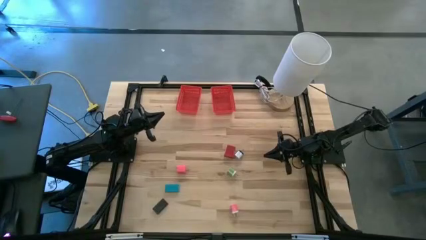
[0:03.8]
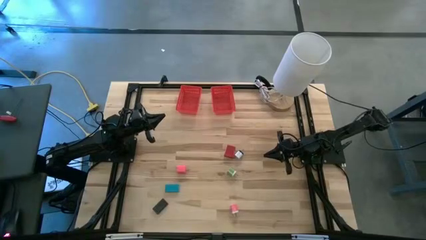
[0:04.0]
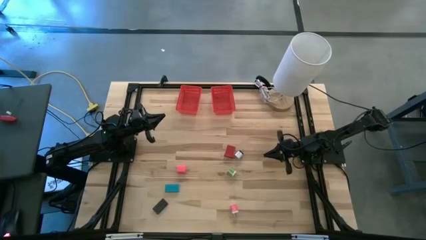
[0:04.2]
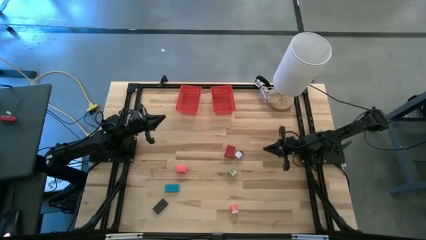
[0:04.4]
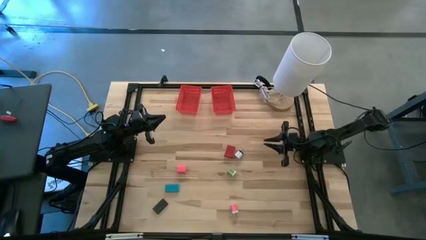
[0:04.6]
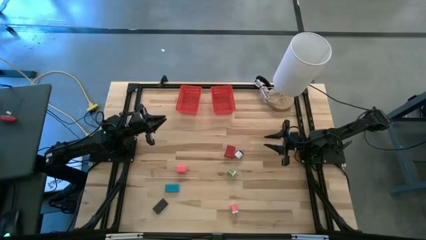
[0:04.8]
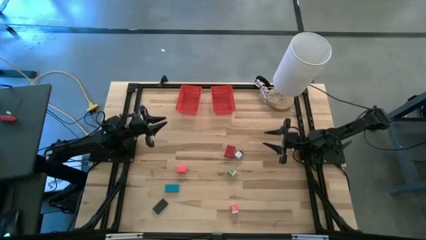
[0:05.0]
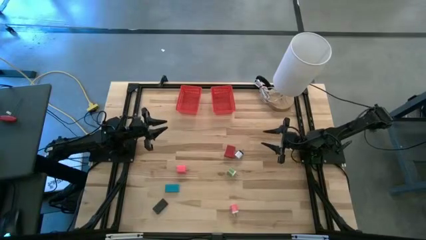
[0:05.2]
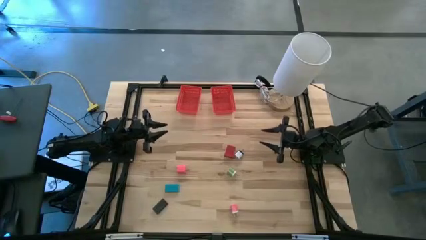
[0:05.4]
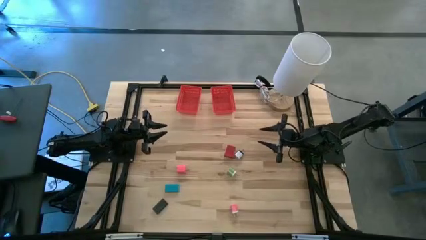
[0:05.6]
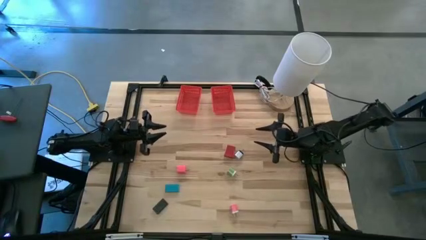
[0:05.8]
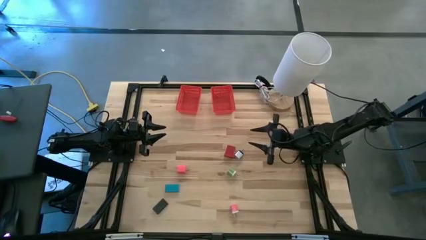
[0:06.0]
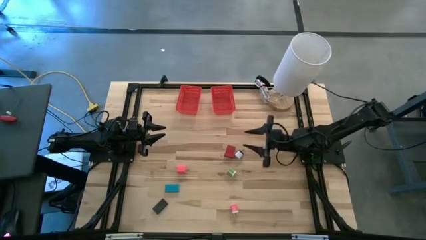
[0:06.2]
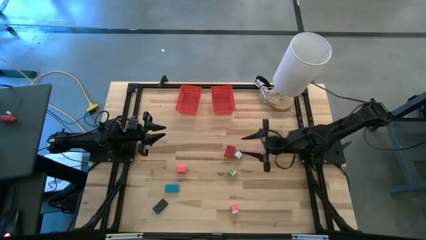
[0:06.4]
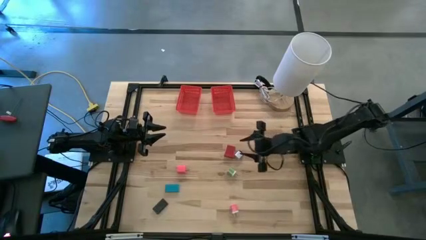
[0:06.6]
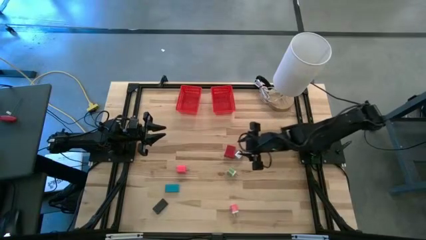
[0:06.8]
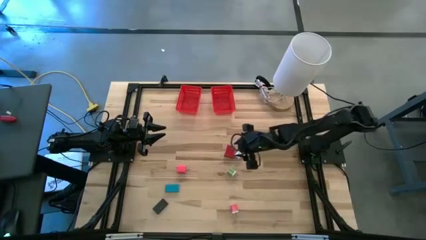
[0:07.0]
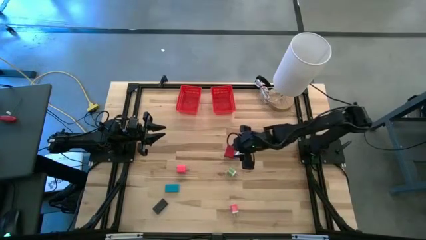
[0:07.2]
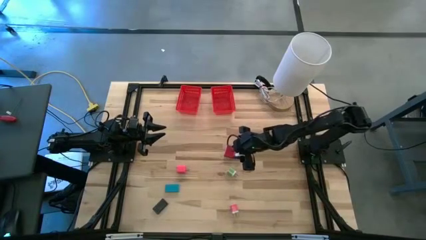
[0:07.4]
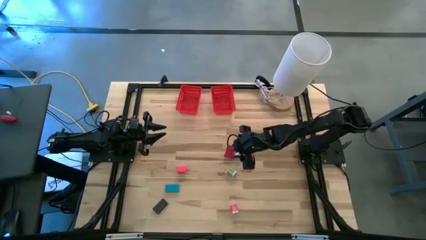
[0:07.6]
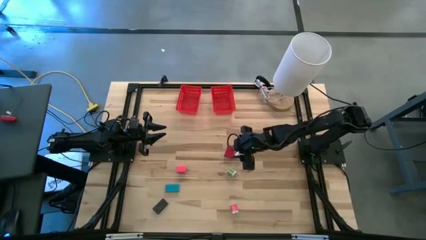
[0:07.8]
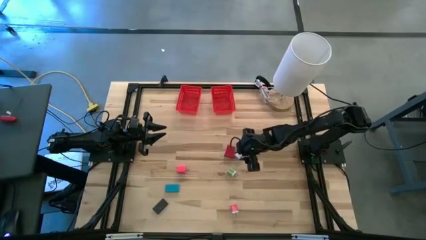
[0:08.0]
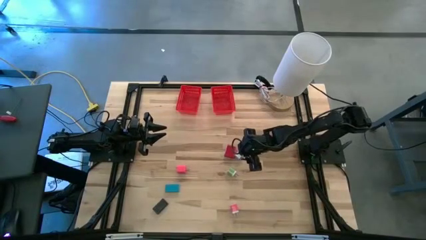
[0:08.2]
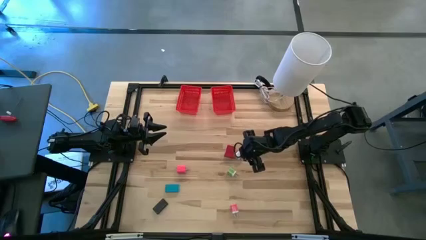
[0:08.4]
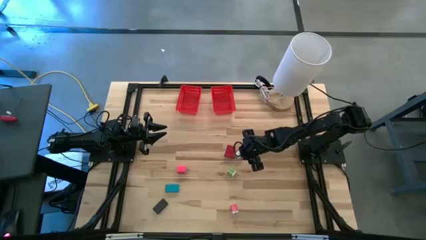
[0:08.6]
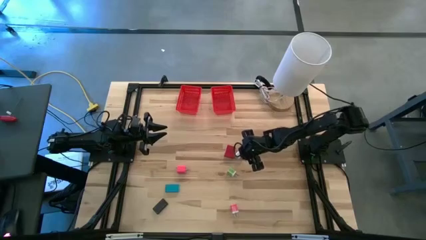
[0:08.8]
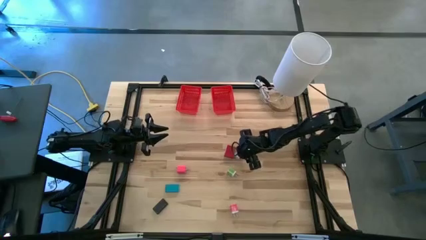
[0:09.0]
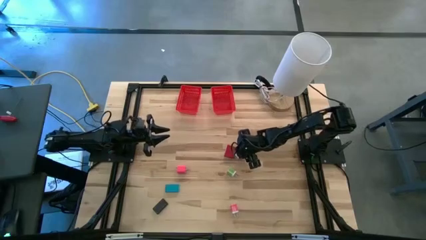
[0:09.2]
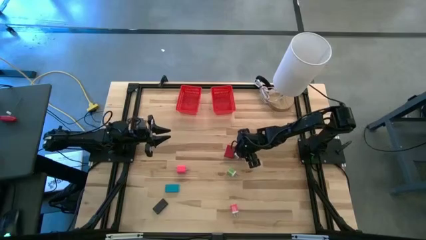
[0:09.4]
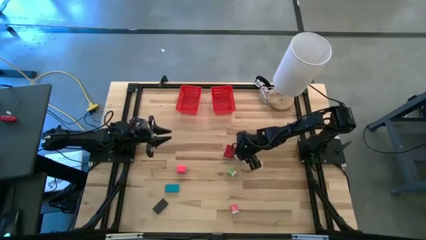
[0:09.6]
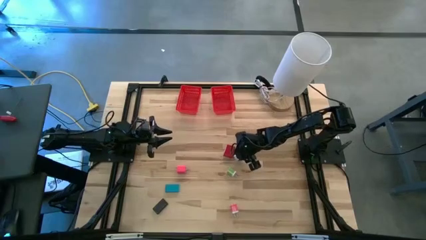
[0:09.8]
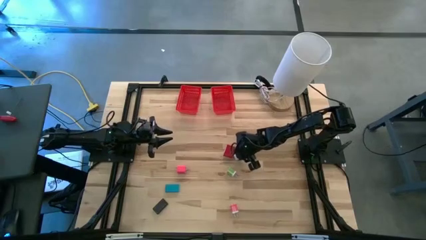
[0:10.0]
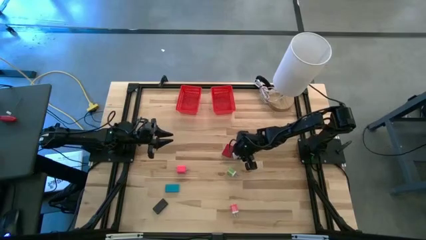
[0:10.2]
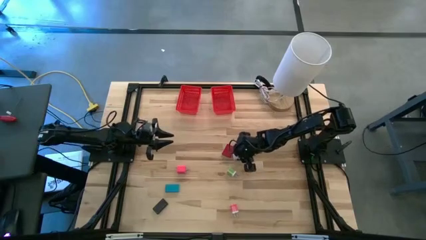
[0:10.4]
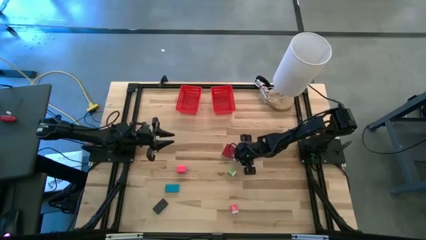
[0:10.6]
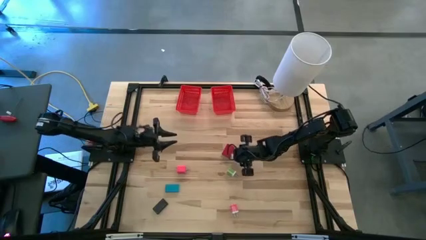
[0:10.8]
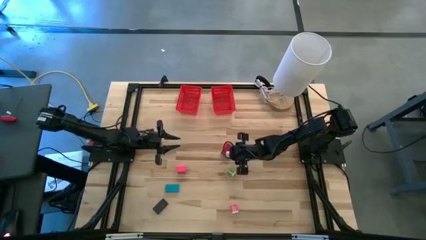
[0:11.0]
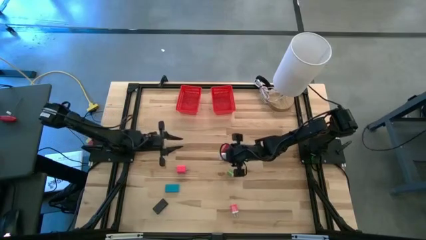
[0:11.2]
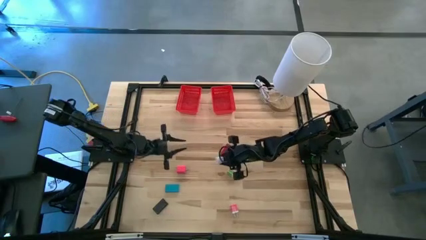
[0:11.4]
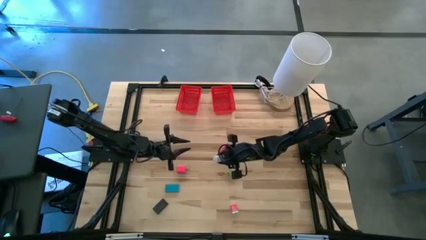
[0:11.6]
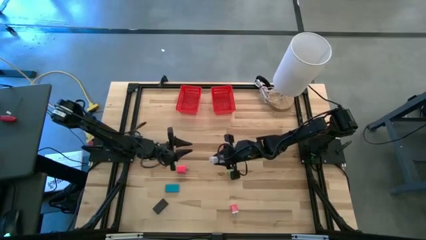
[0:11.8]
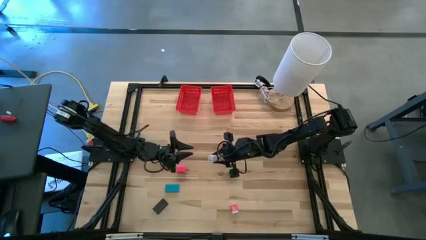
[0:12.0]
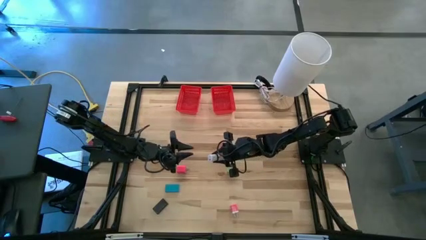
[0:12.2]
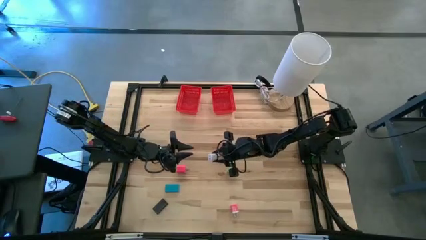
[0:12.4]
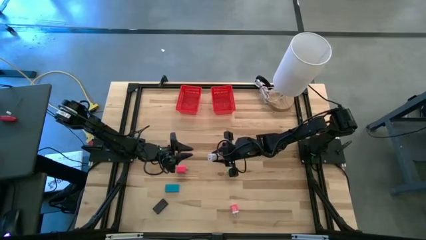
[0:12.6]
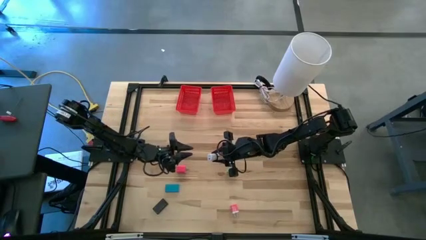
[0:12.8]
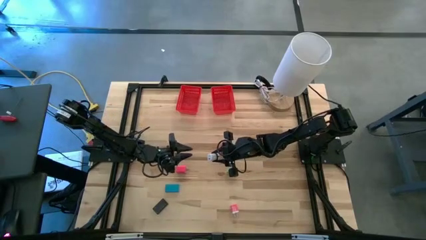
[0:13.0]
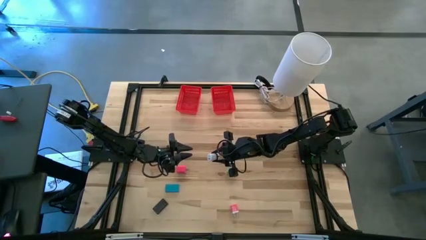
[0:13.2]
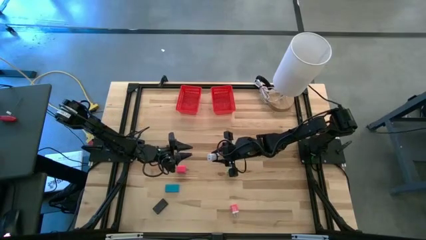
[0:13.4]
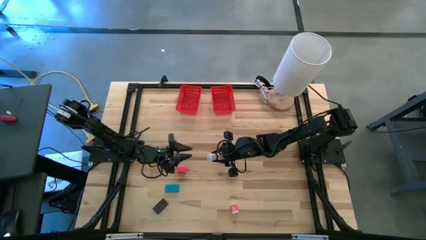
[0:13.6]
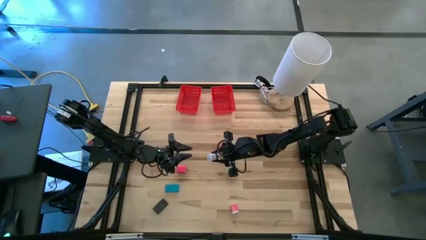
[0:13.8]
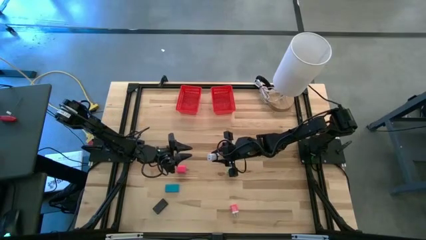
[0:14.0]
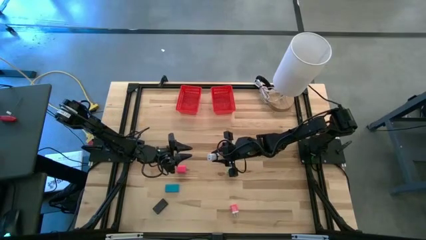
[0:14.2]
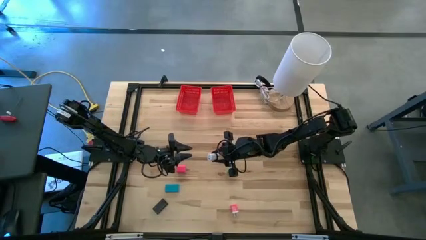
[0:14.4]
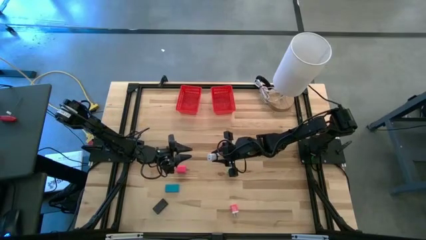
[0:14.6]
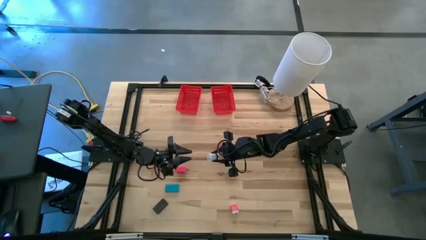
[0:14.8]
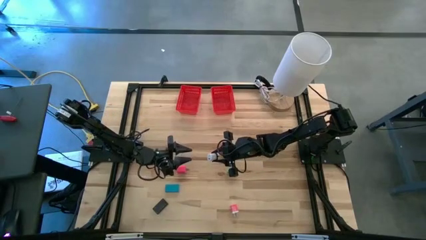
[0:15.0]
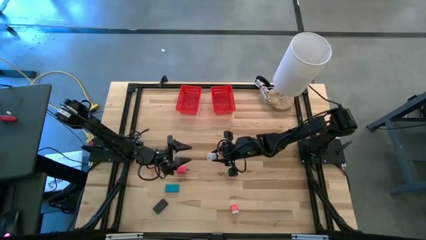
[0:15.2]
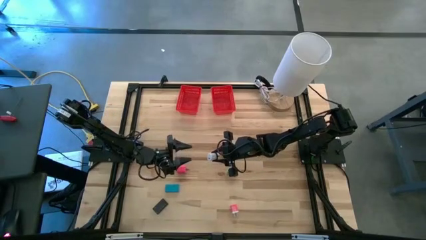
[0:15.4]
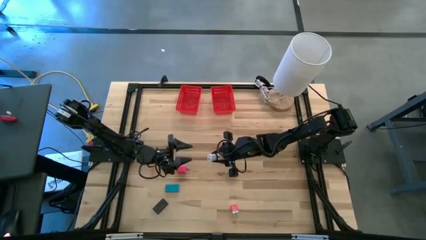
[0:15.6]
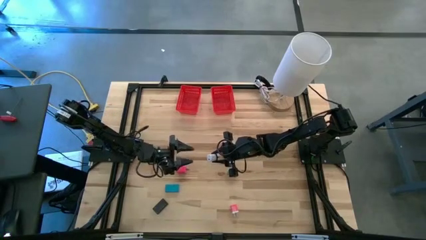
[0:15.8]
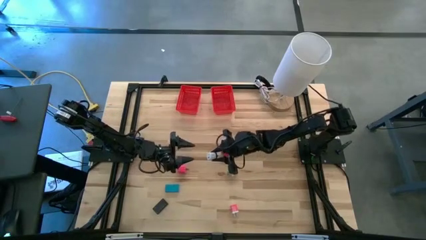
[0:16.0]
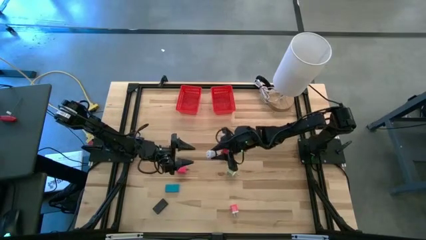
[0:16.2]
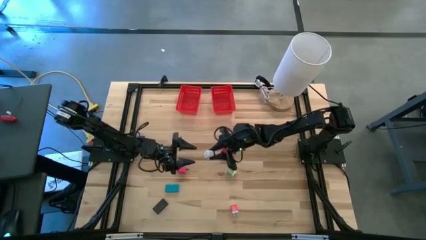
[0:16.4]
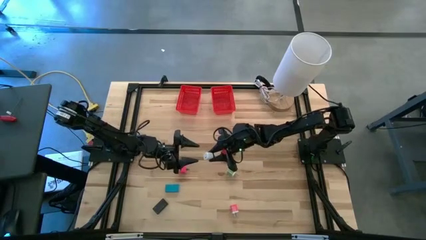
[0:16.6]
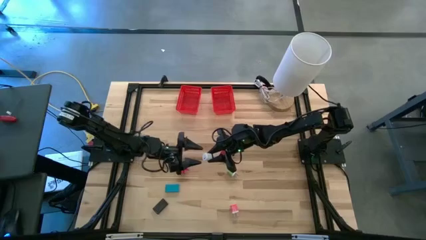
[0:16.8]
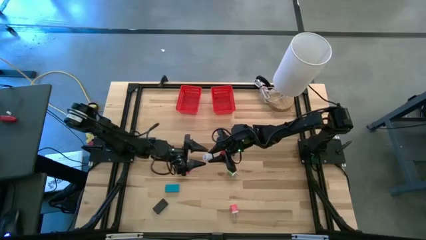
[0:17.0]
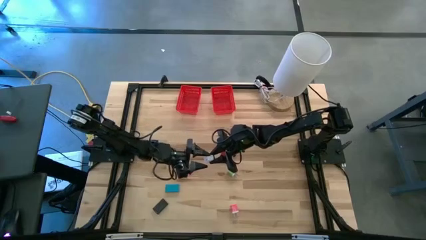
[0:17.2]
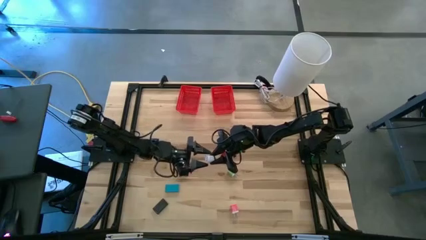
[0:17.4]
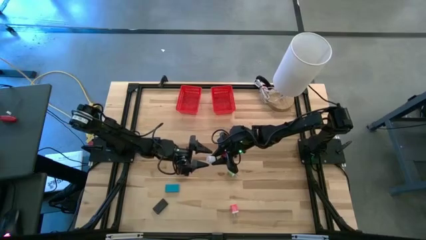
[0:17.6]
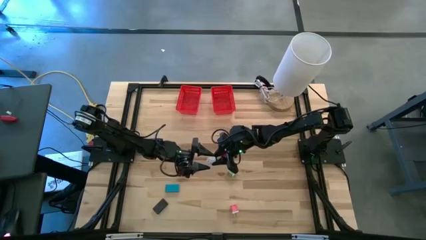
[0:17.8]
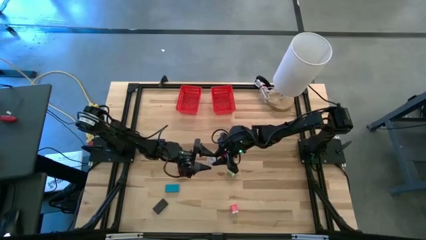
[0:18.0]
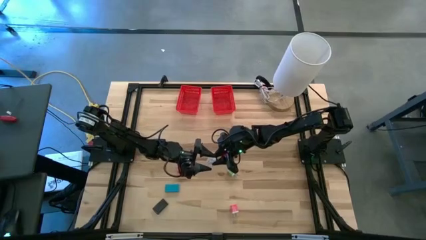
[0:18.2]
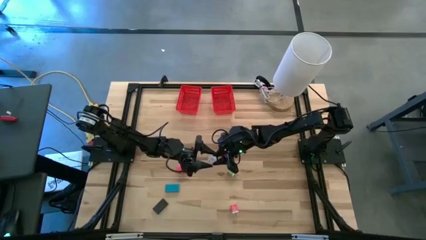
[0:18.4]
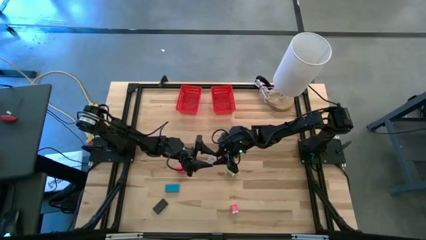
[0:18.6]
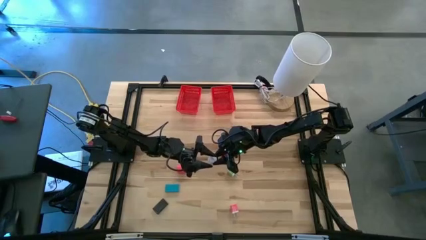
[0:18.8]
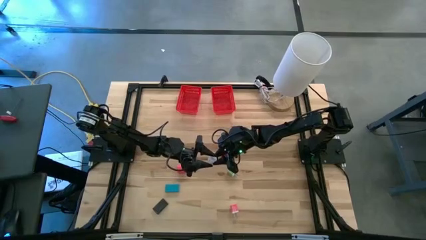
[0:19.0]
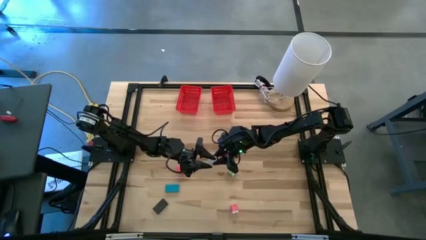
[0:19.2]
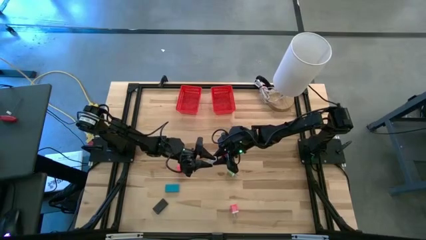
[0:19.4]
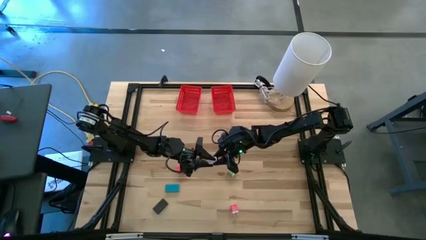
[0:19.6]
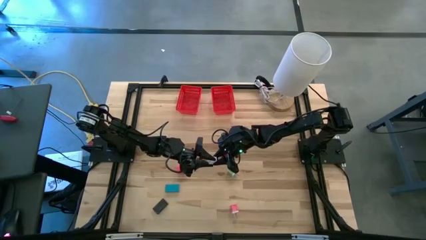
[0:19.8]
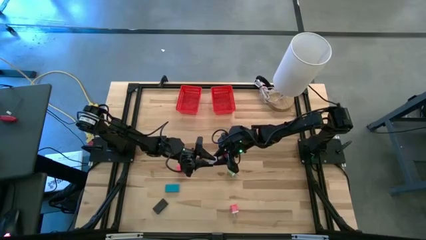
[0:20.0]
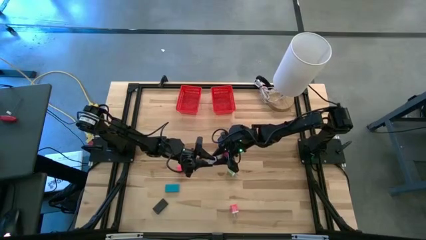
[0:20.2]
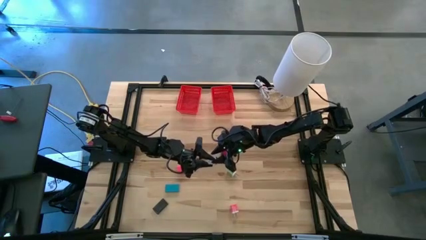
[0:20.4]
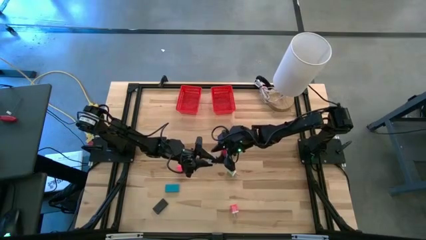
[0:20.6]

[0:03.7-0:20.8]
Task: Pick & Place Office items
Put the white charger adapter into the left red bin
